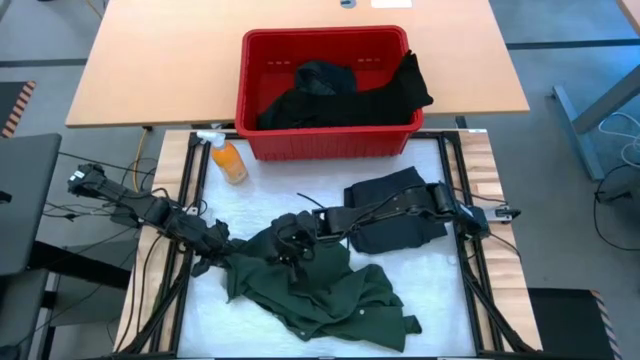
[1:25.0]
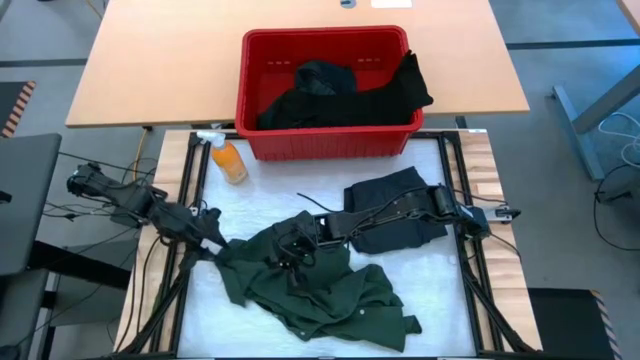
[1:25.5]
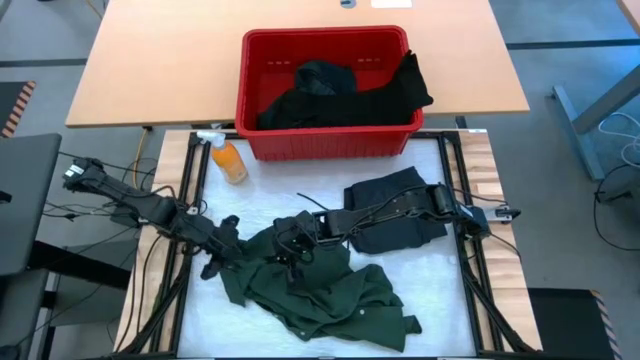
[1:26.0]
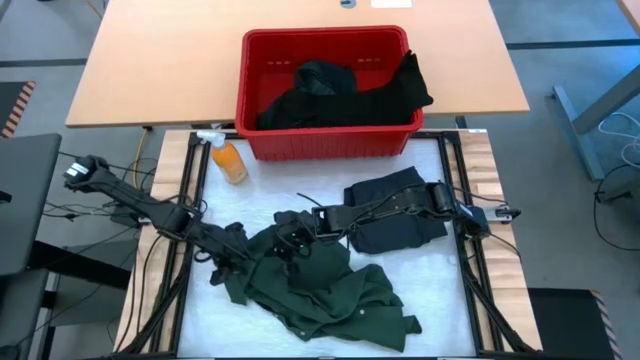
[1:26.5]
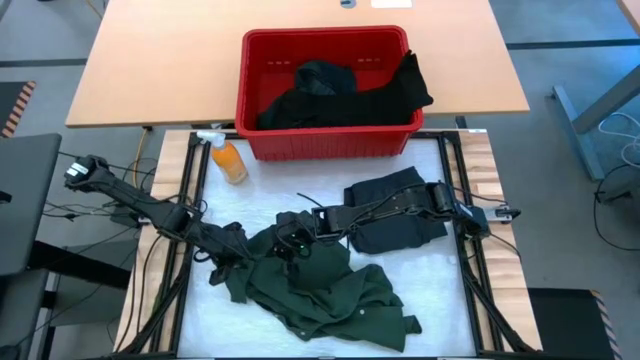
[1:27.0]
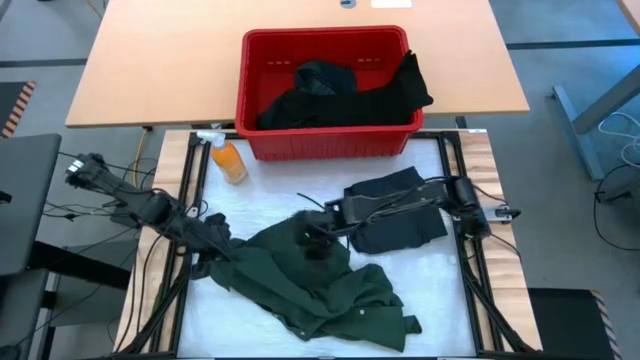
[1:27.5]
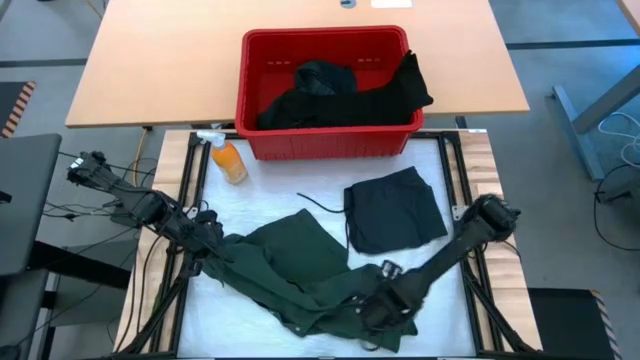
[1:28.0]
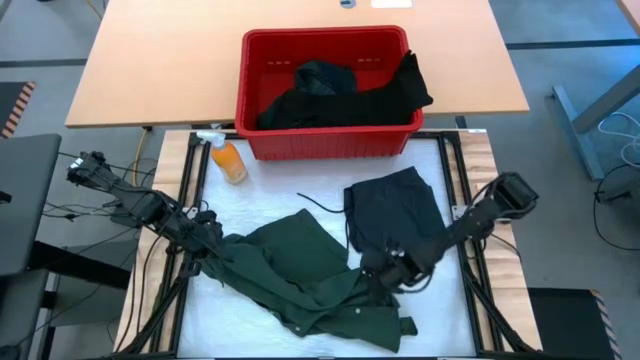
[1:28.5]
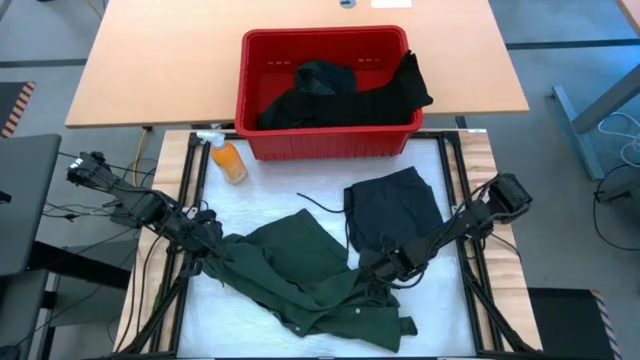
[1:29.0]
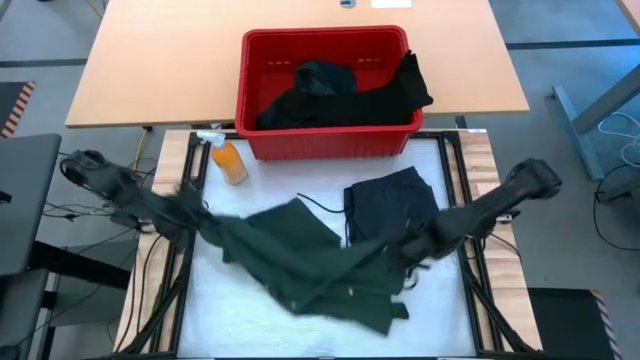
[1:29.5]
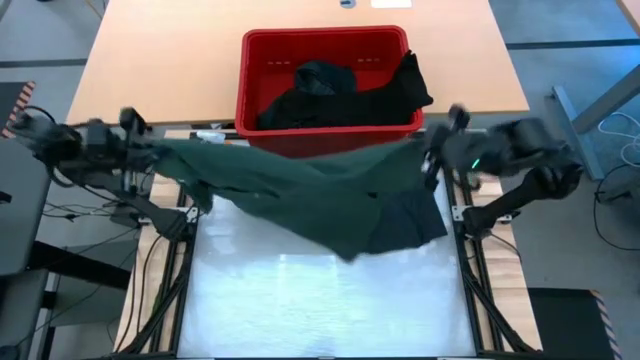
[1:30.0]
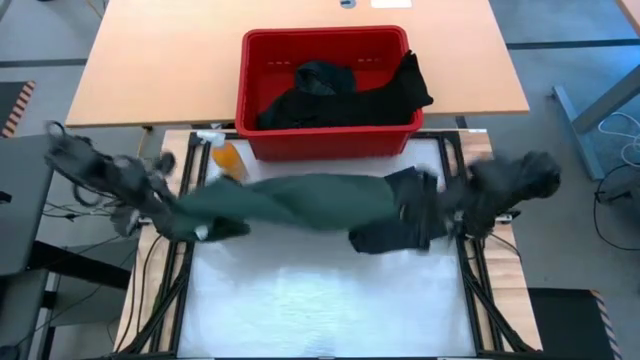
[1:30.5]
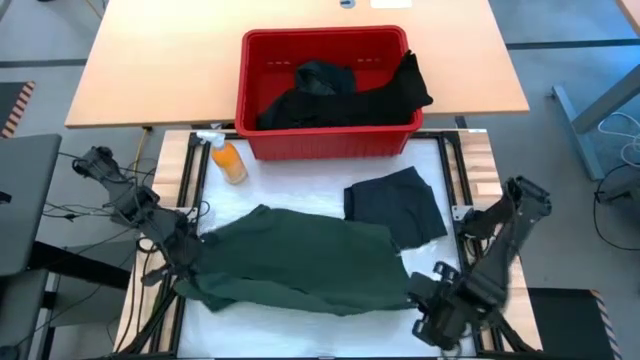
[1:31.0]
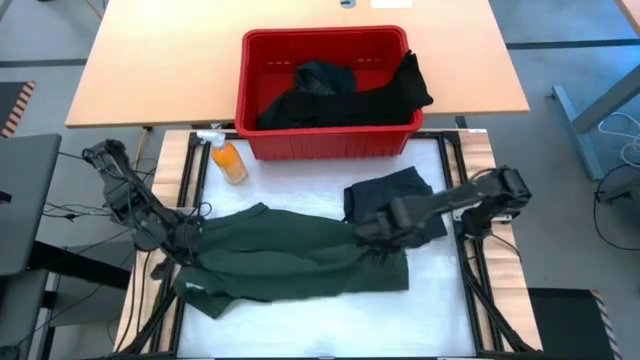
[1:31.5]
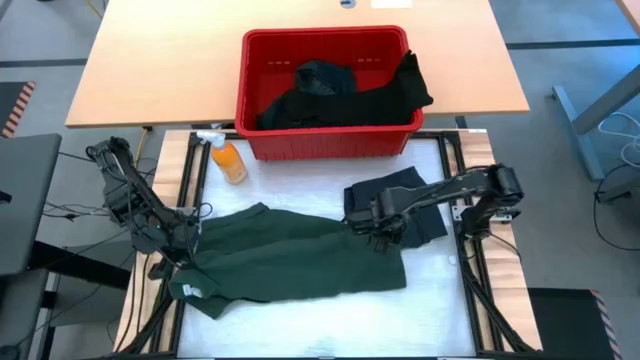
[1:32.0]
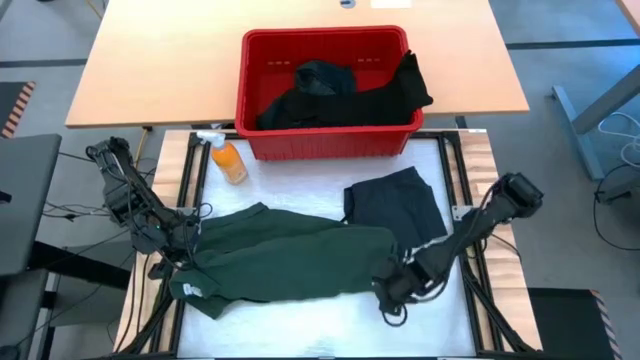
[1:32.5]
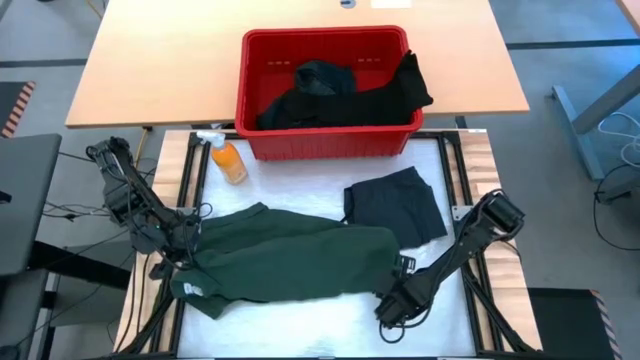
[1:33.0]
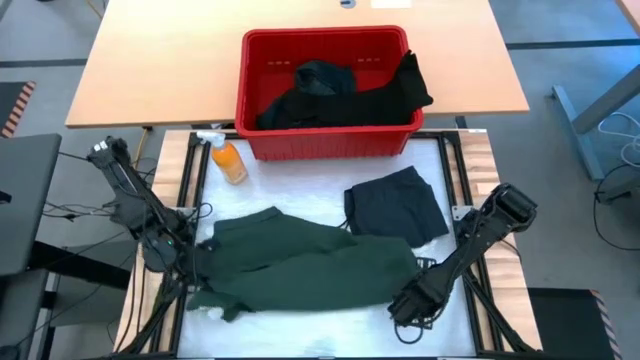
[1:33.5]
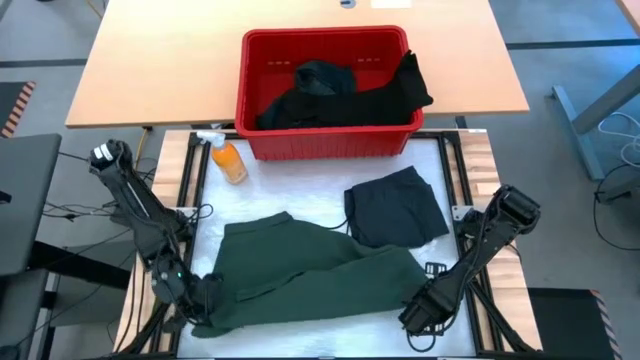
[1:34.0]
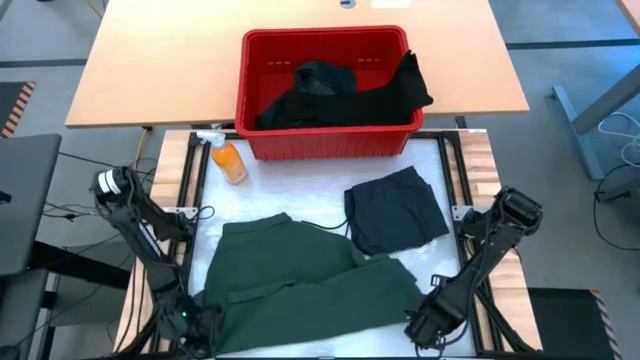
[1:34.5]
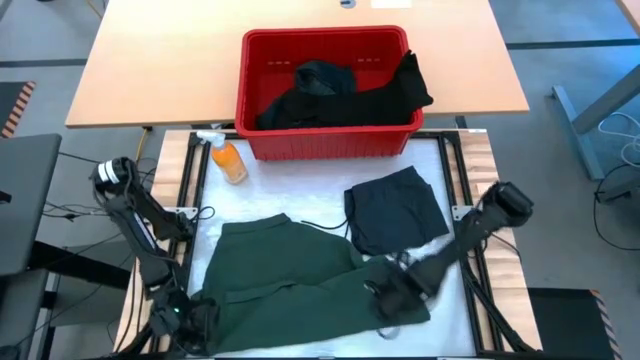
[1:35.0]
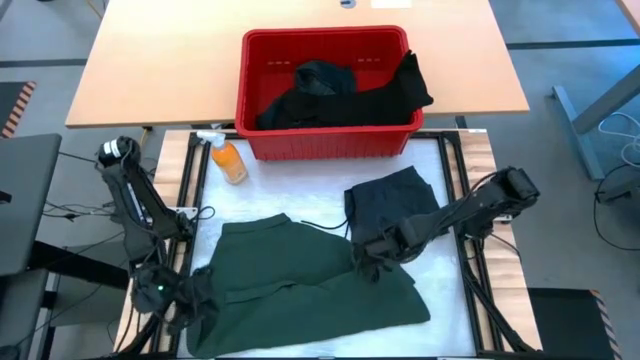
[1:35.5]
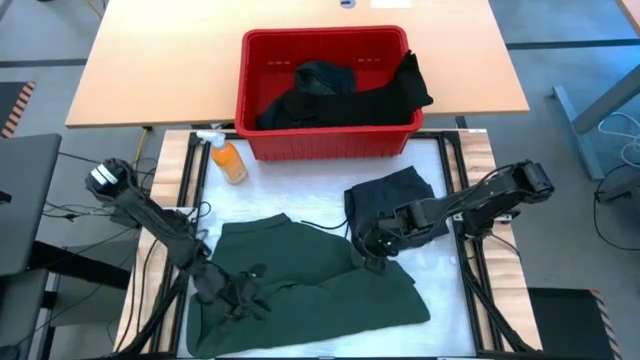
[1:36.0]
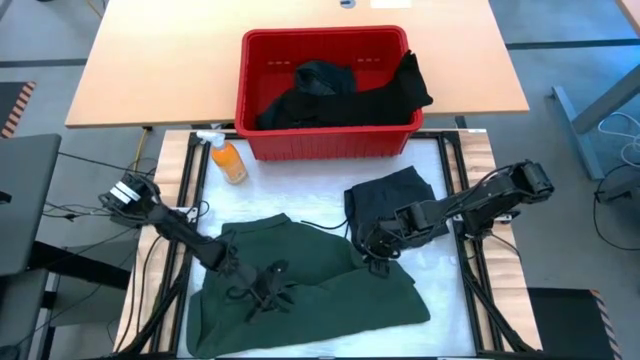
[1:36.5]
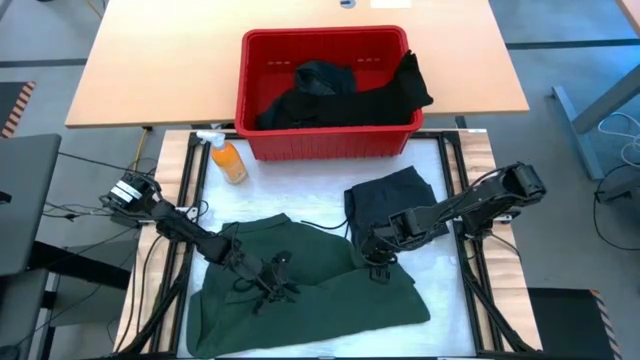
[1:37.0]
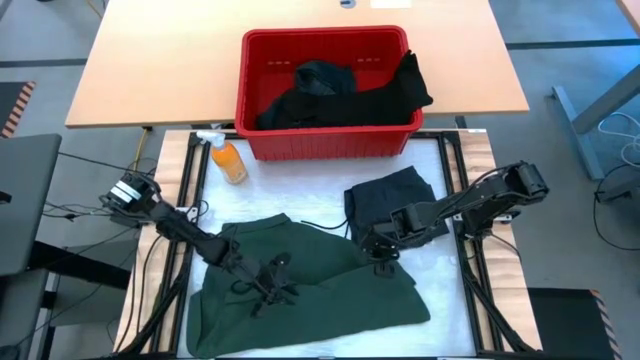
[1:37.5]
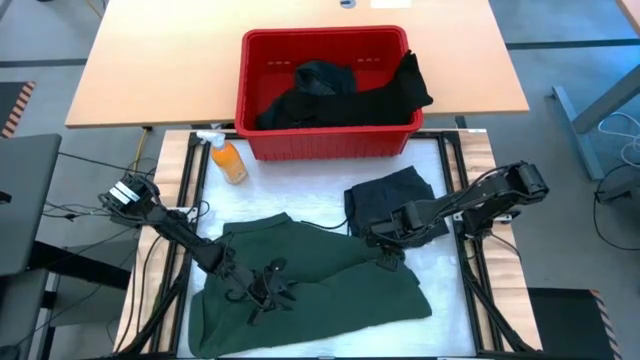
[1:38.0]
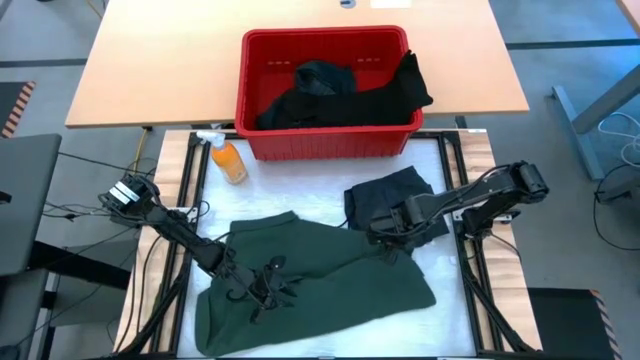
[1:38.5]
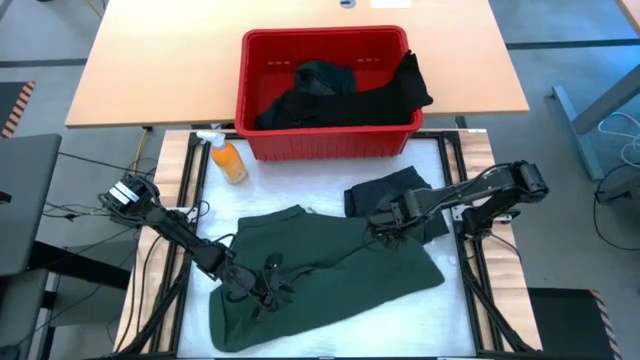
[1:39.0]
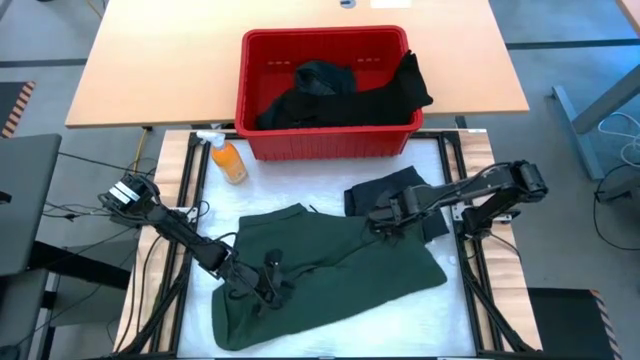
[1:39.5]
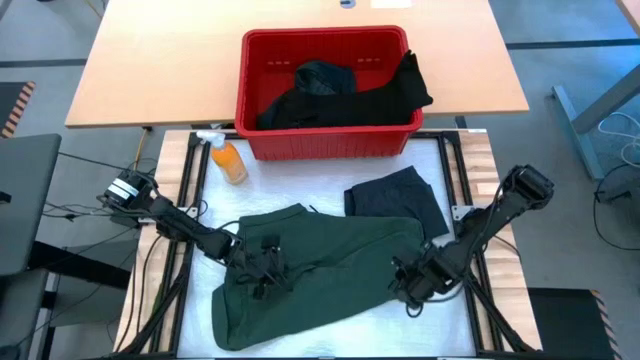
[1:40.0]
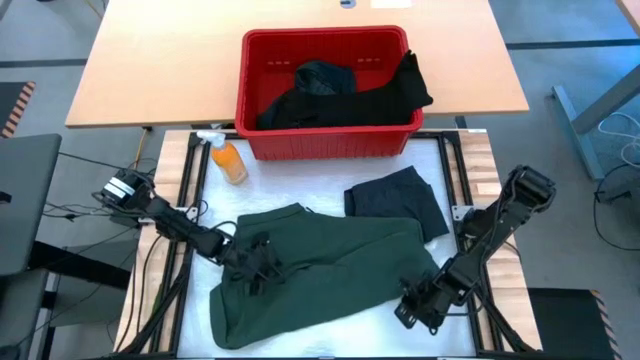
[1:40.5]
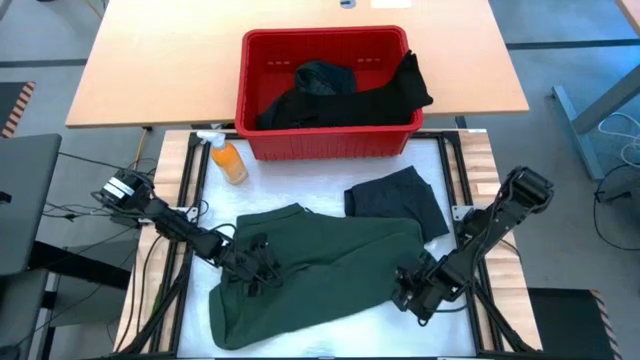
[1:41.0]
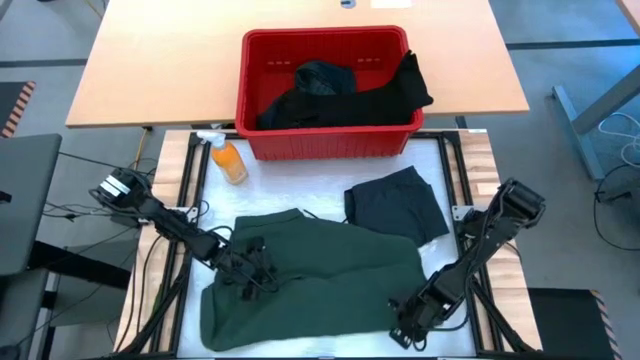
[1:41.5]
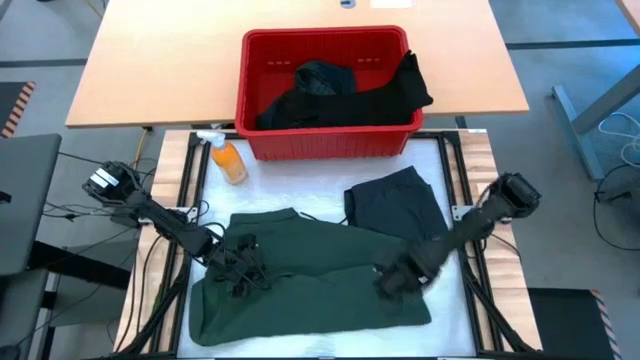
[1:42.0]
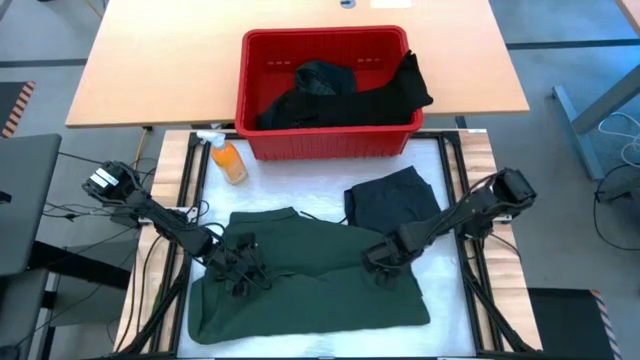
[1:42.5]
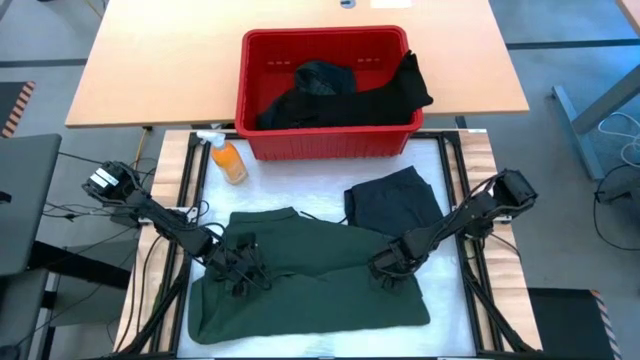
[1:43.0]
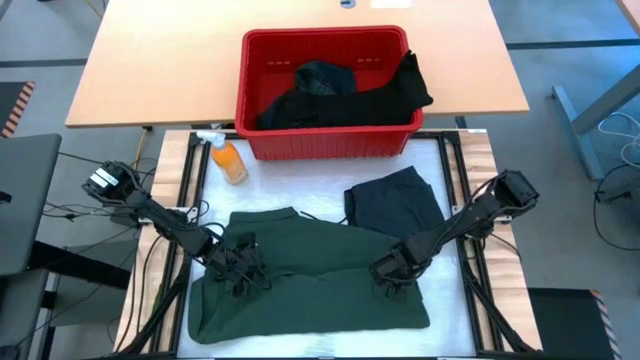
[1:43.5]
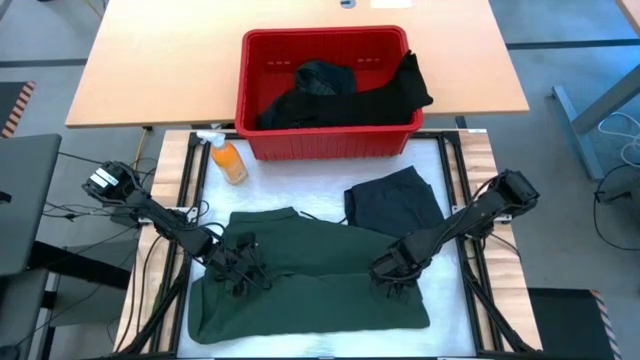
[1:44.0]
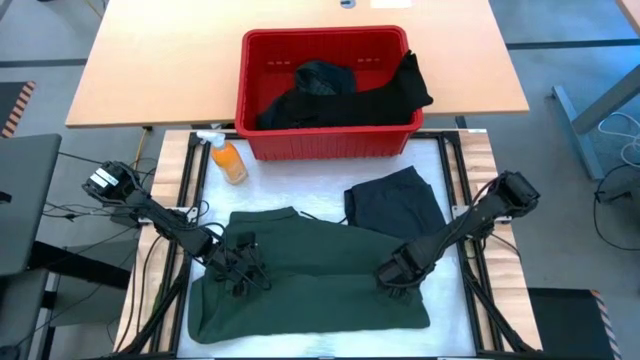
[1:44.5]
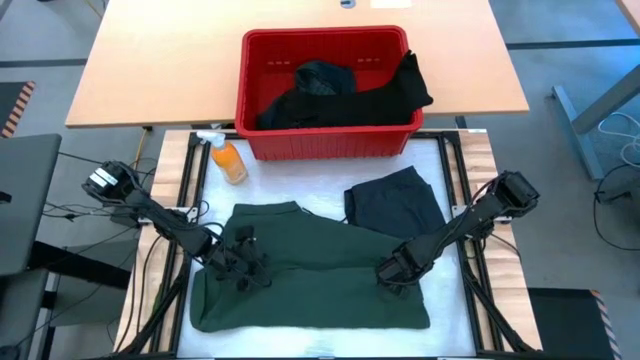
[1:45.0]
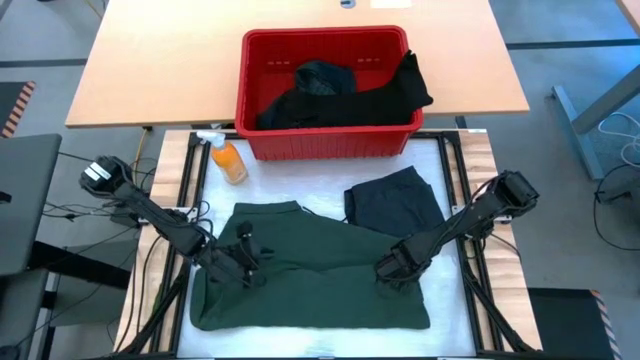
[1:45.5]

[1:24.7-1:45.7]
Task: Fold laundry
Fold the dark green shirt
